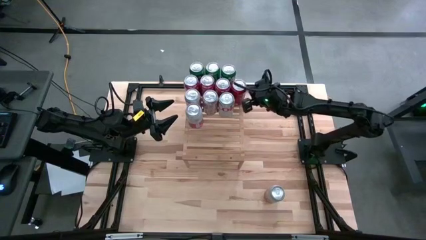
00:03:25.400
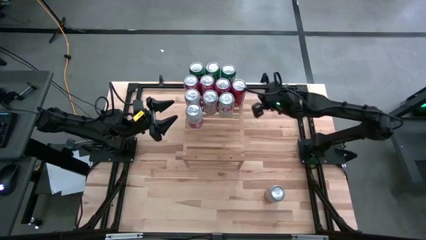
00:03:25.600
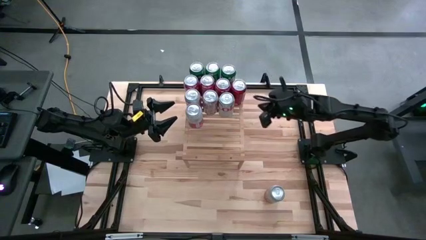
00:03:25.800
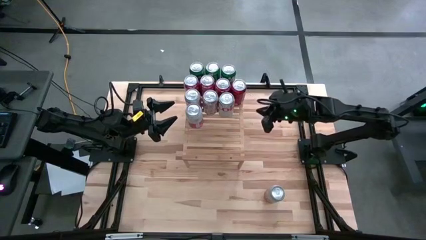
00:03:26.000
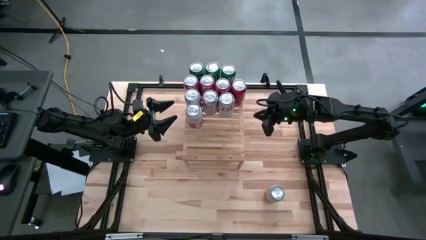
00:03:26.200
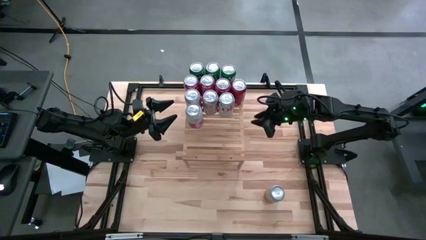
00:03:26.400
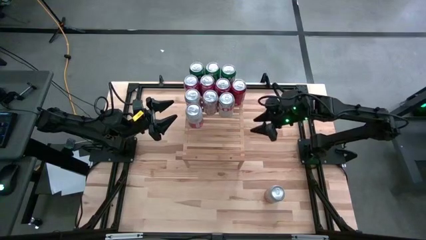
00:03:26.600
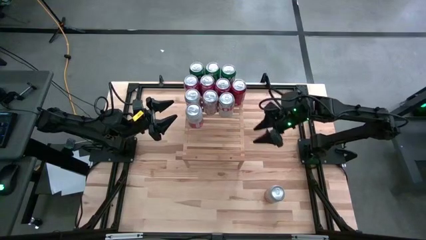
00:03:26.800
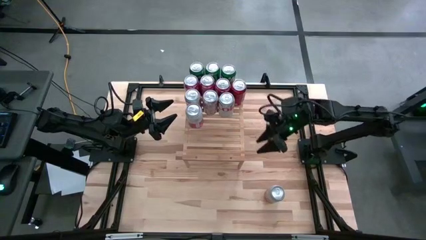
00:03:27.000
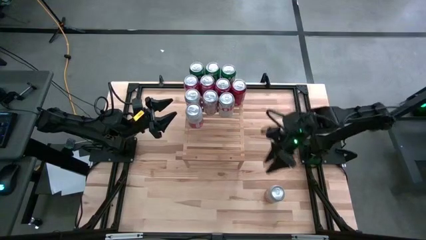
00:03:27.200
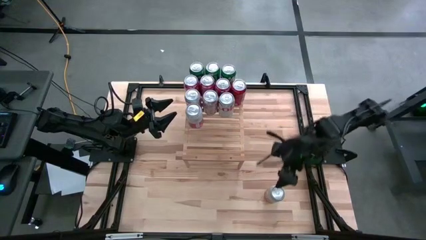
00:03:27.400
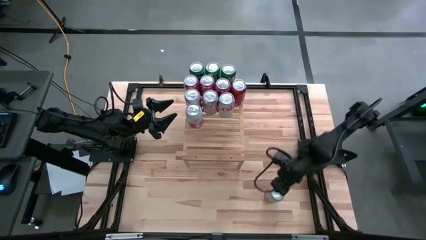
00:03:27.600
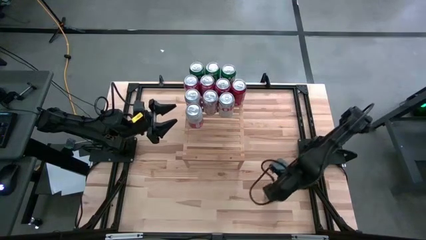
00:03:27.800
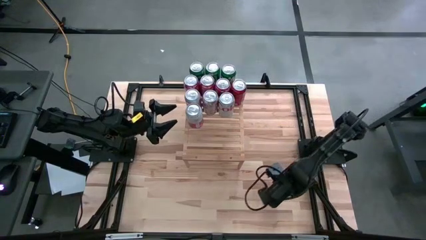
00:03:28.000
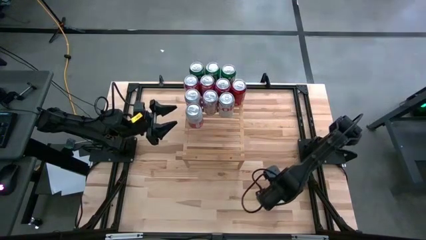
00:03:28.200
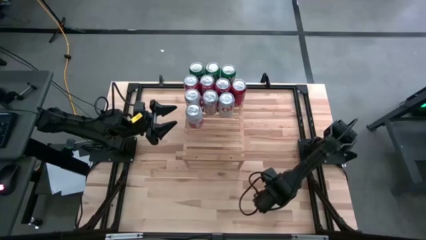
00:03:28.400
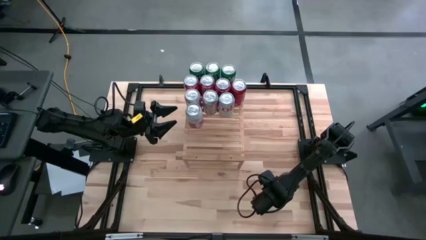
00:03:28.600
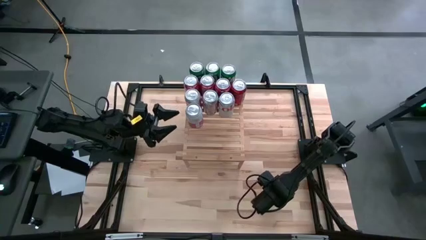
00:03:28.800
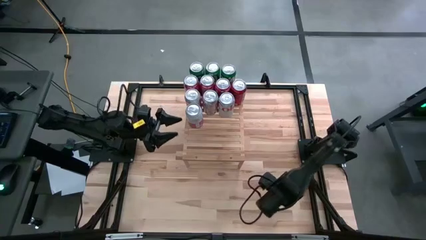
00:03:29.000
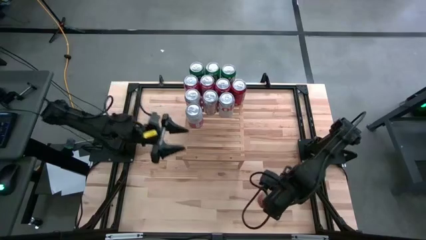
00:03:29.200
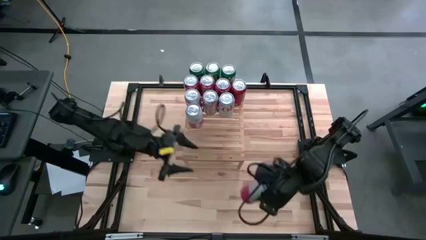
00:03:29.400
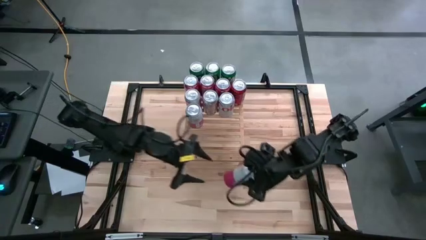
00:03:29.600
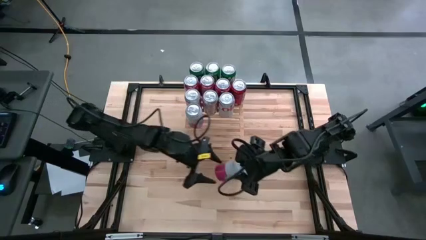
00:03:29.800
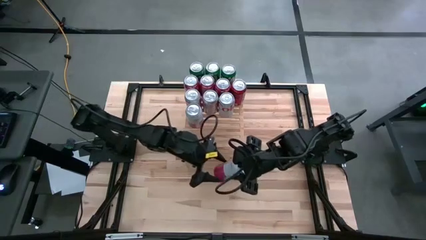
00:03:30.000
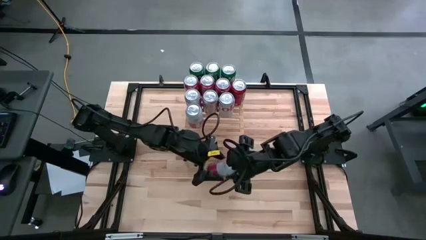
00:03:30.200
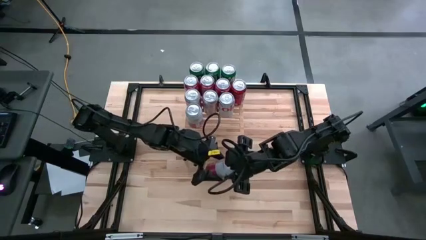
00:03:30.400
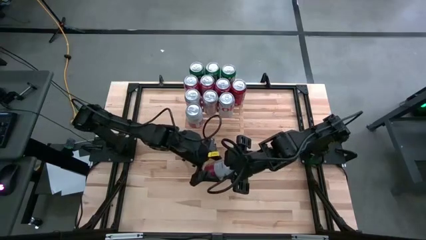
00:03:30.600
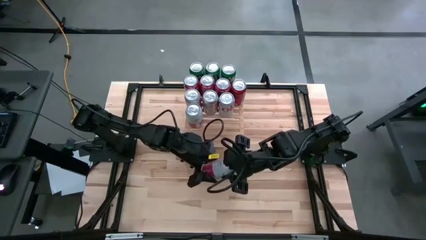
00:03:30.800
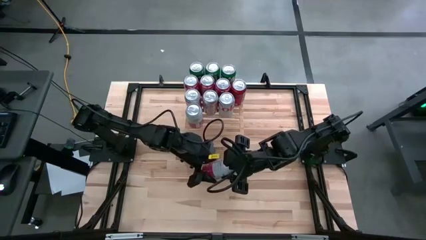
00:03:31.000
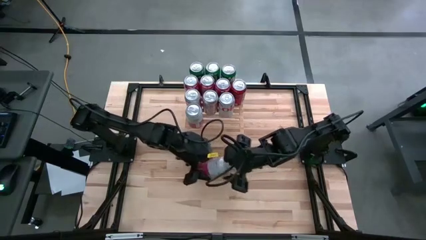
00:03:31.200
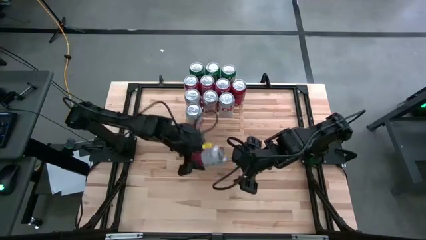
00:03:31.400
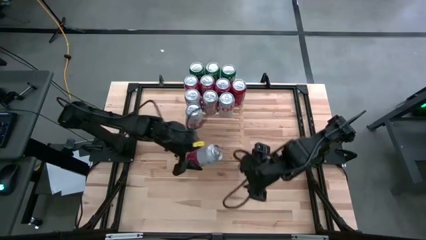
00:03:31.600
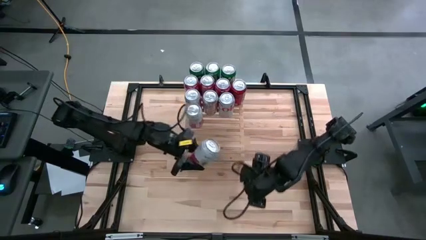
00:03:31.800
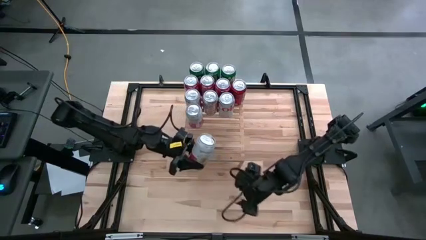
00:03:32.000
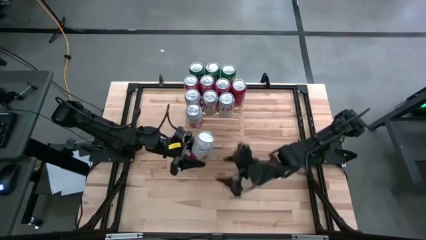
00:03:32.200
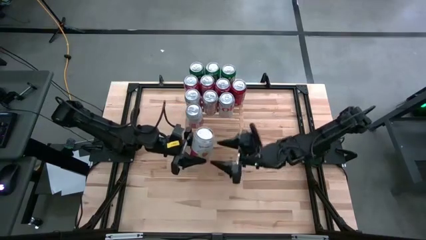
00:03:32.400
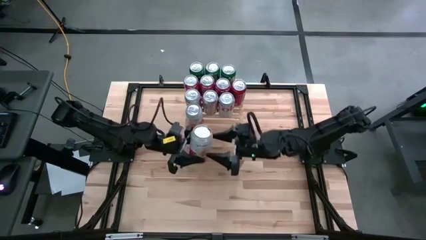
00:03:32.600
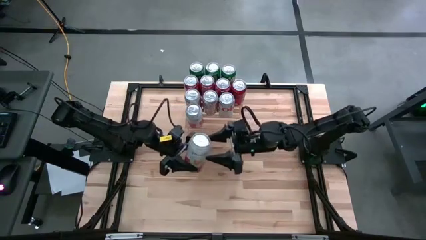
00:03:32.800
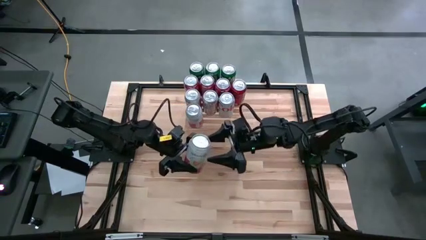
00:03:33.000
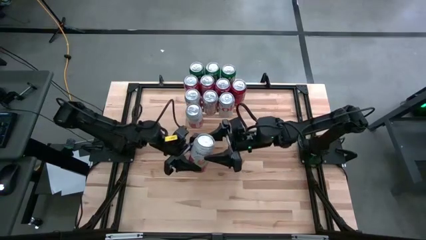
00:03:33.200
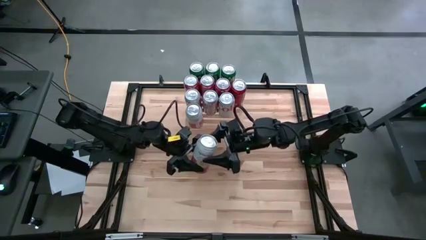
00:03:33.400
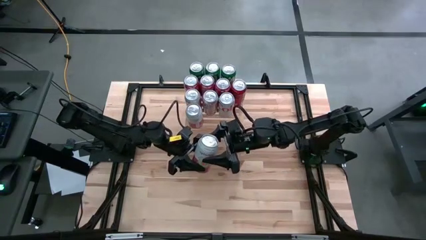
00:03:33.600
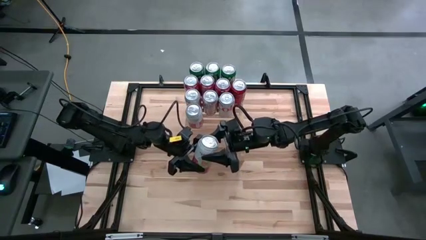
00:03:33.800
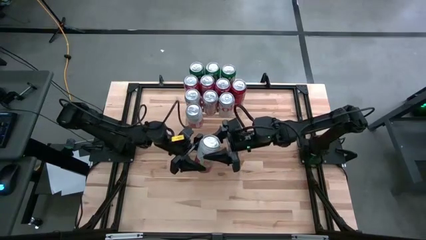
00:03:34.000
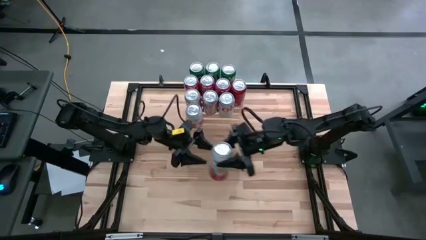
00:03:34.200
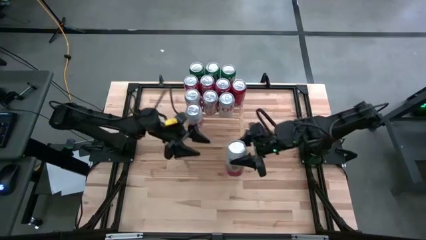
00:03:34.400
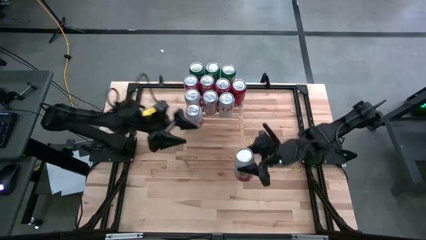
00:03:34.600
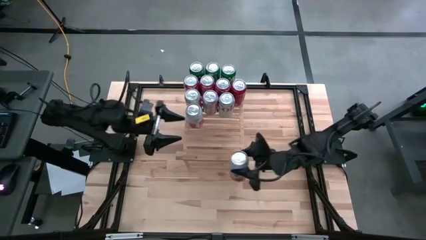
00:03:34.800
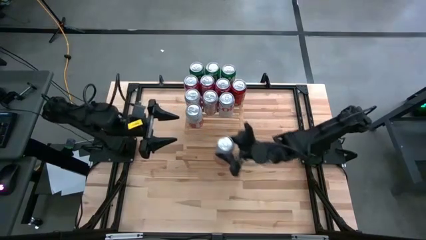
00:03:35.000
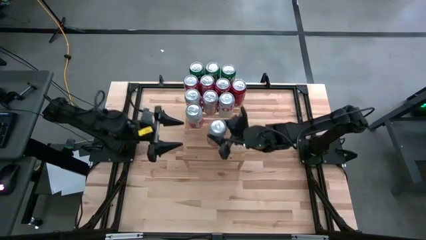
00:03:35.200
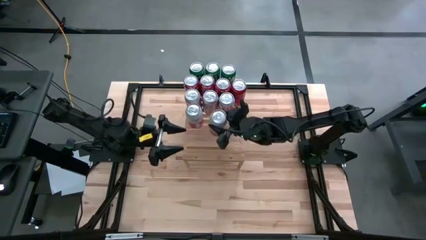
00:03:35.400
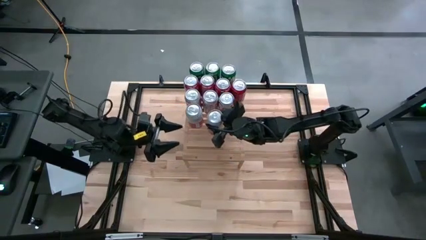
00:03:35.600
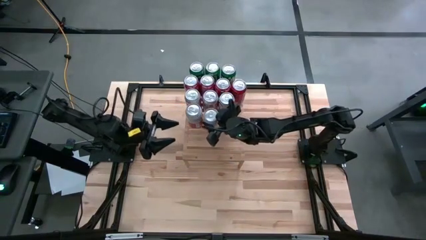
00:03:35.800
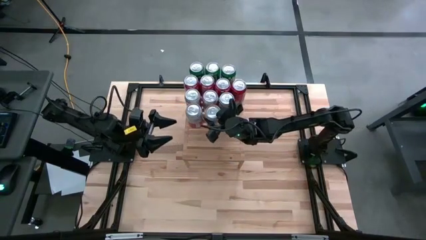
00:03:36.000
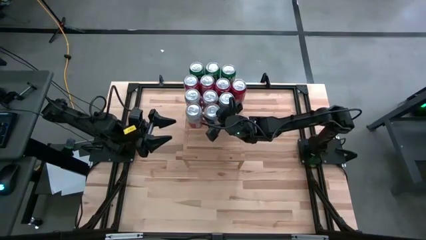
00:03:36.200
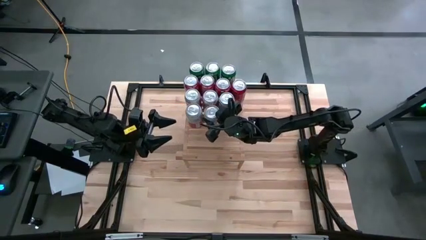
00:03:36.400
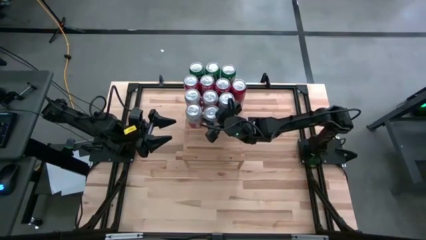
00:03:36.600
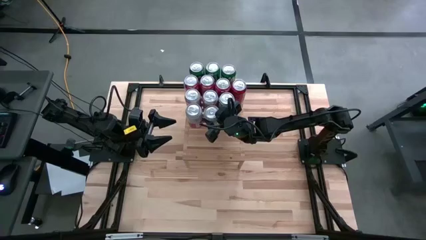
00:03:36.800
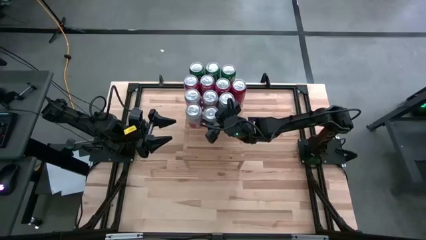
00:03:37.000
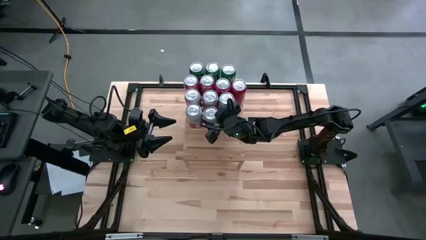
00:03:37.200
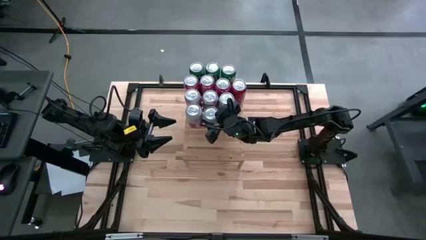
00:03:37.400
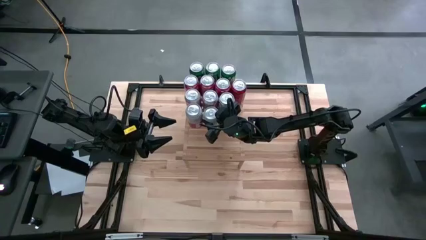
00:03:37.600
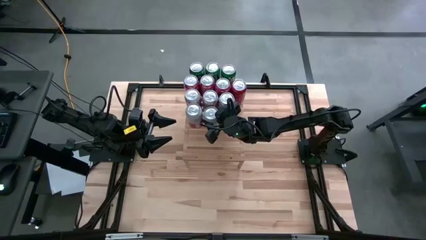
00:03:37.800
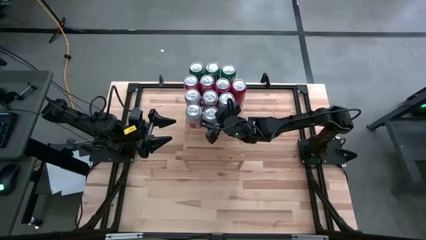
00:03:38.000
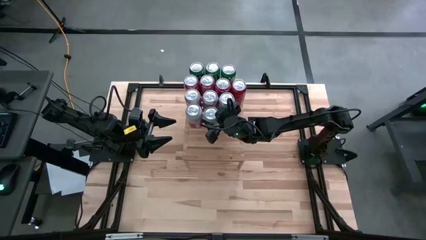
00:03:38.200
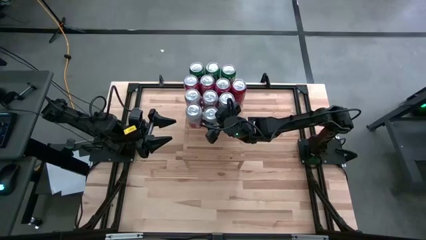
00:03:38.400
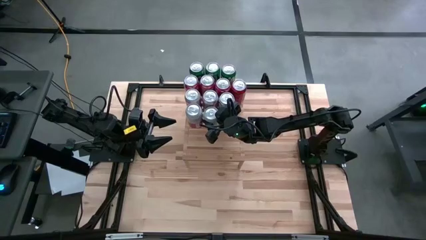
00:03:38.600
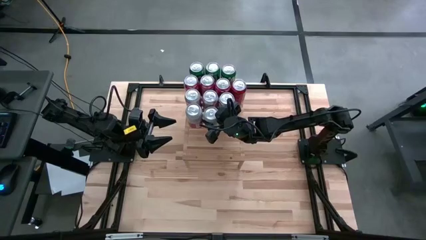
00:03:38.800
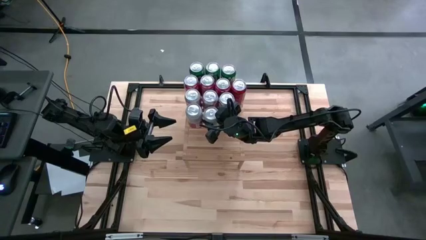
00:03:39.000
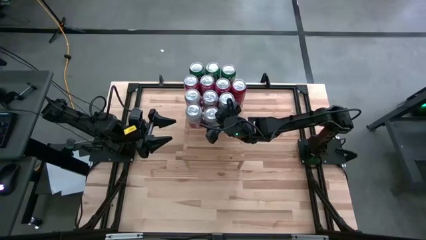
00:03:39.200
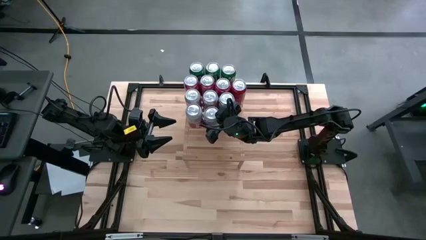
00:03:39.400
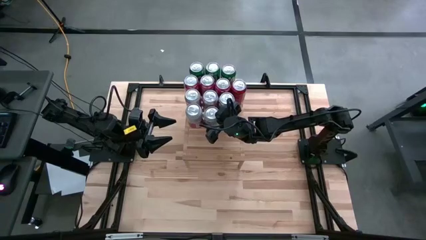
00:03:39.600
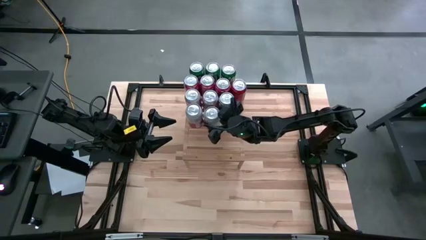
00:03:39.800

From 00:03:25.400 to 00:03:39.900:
Task: Place canned beverage on shelf
Put the pink soda can on the shelf aligned with the other pink soda can

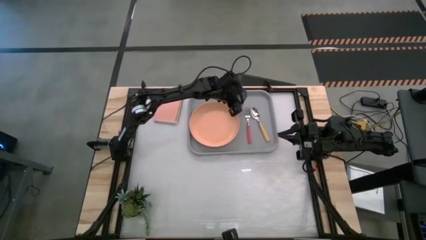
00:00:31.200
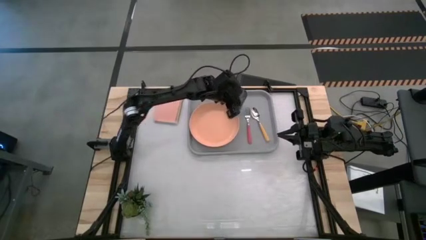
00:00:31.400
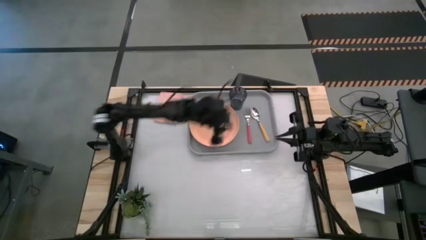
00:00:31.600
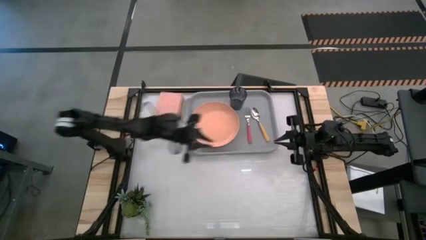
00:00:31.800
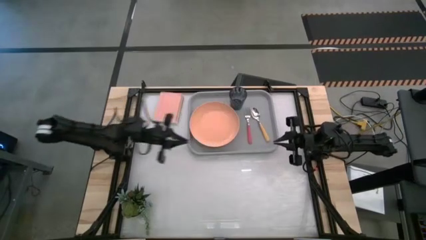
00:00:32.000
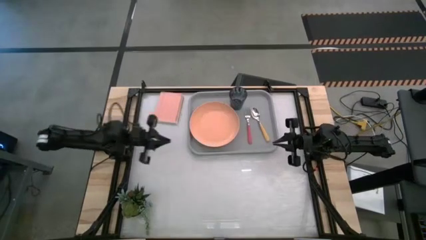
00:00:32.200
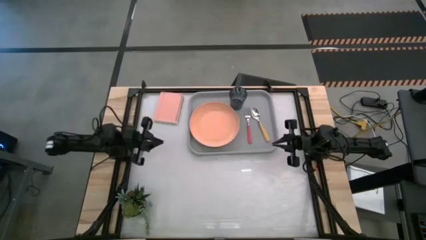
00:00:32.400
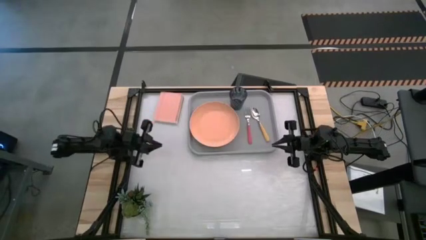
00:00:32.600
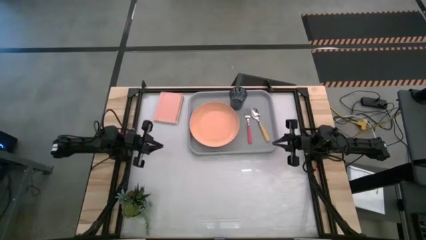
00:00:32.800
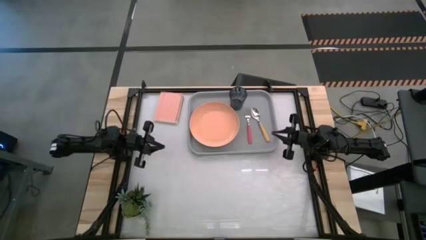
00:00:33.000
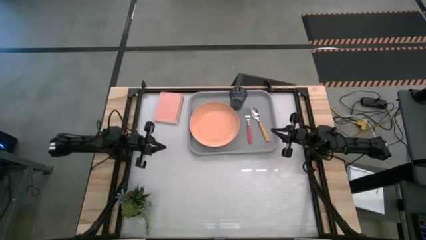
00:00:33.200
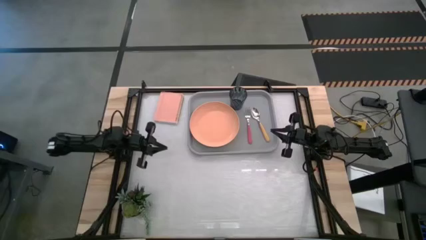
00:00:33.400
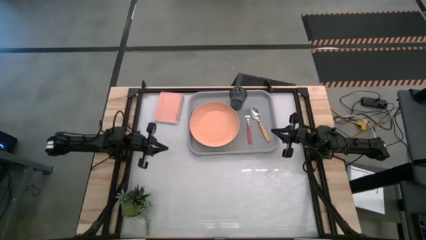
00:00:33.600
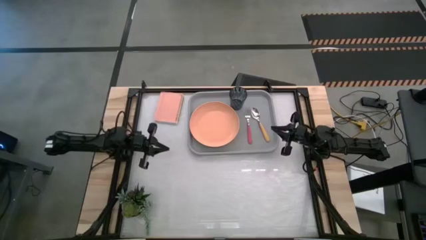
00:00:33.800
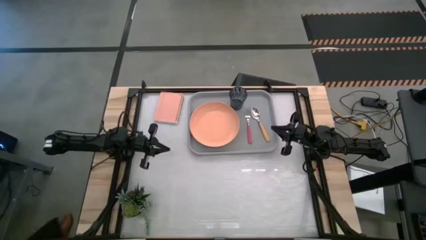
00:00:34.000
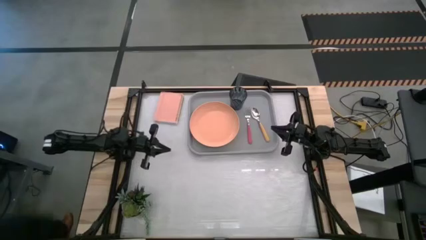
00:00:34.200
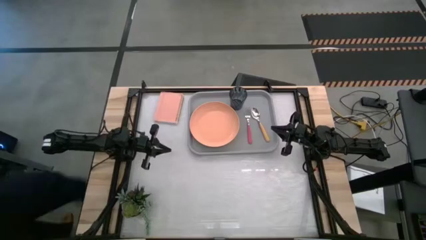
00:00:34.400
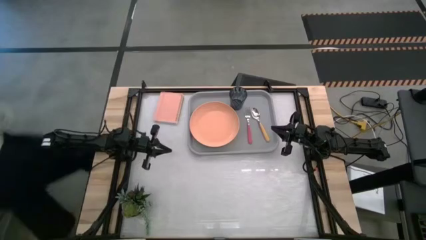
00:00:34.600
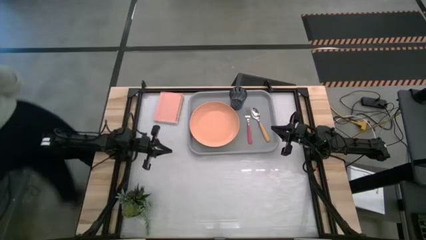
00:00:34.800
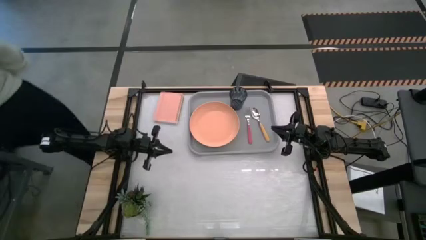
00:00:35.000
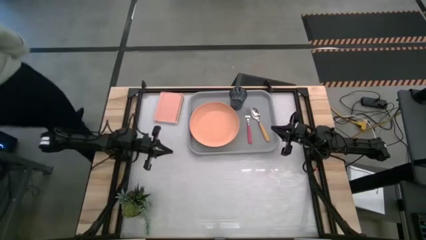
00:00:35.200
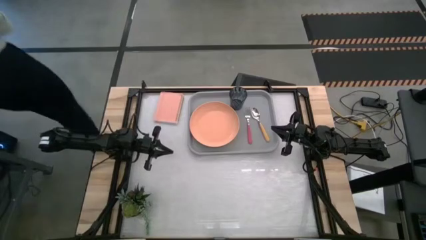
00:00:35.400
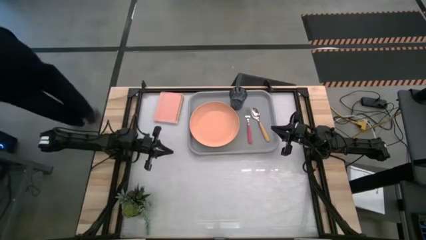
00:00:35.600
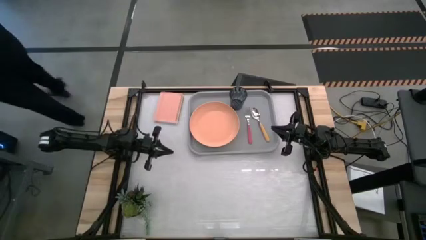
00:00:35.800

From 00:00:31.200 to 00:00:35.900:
Task: Pick and place plate/cup/fork/spoon on tray
Return to Home Position
